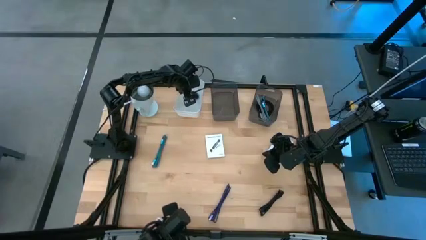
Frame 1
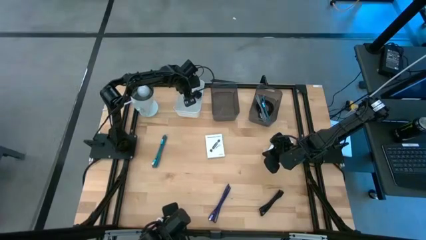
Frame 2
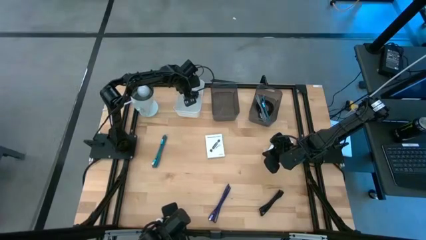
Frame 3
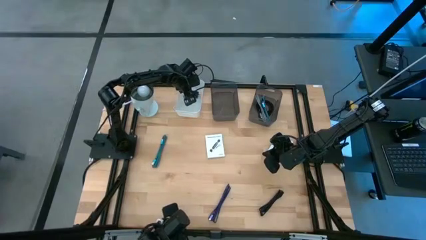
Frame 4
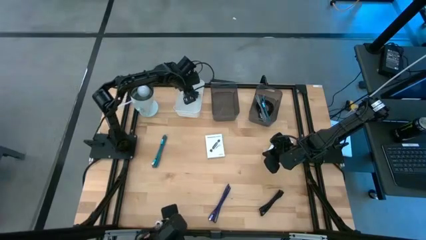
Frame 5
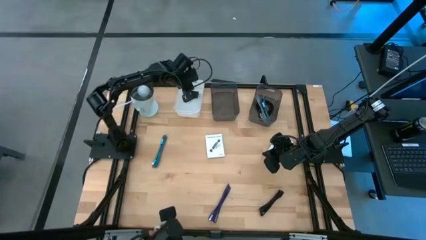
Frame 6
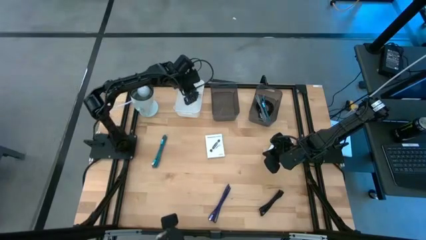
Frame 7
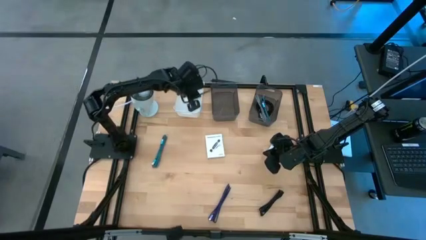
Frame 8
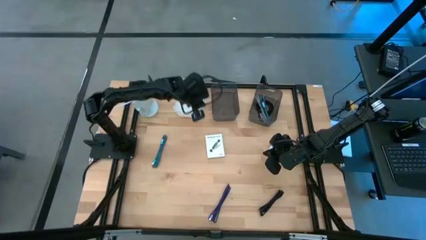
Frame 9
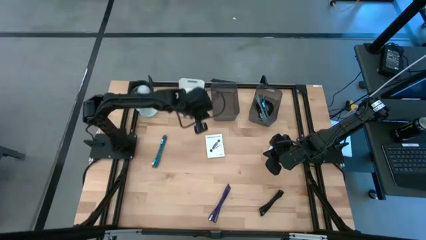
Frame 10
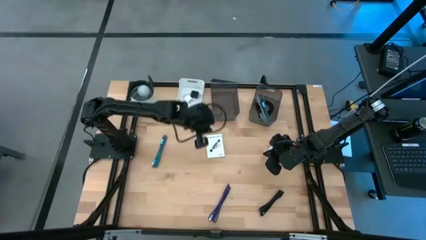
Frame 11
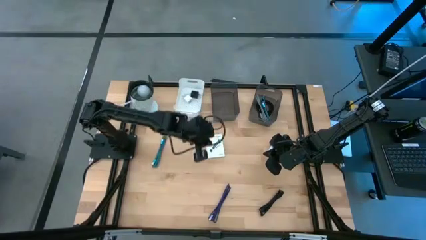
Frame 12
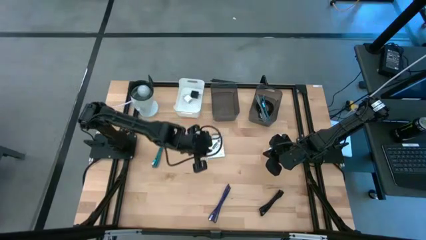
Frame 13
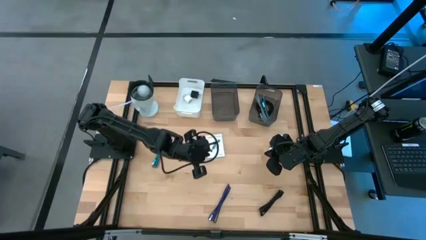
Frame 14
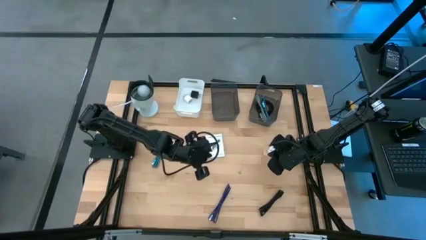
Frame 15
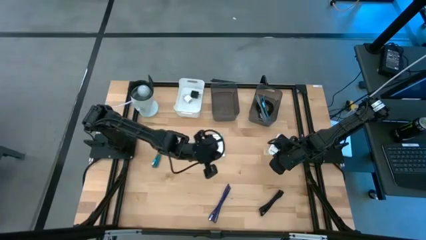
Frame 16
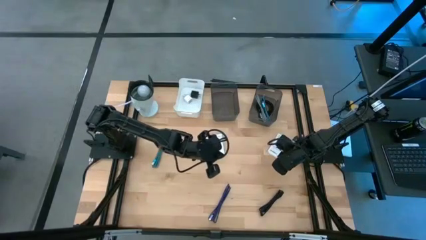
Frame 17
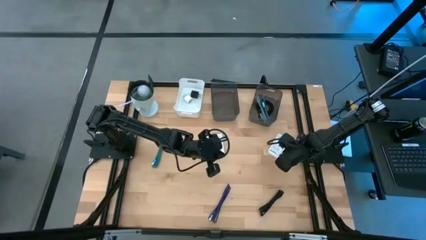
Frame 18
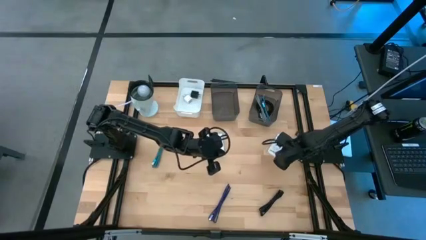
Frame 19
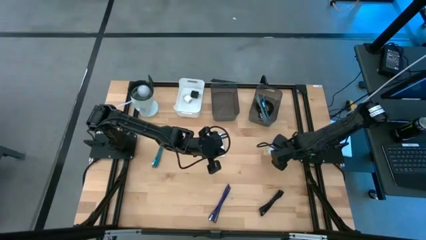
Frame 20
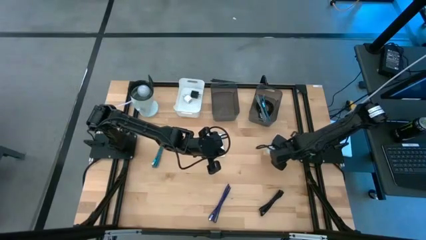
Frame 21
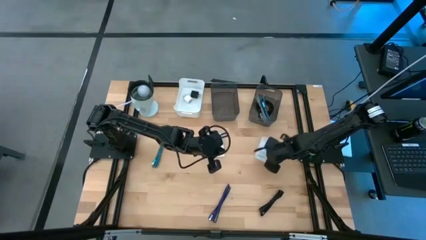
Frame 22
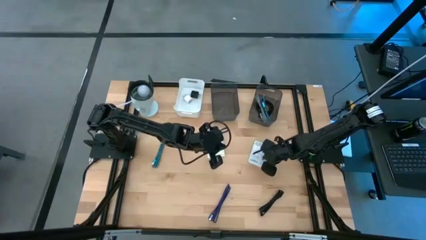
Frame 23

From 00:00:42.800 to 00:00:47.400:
Task: Pick and place items into bin
Adjust the right white card reader box on the table

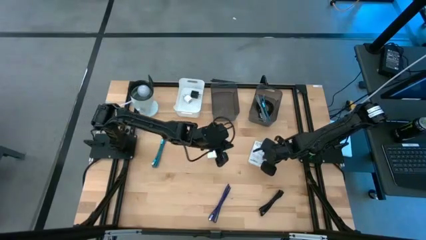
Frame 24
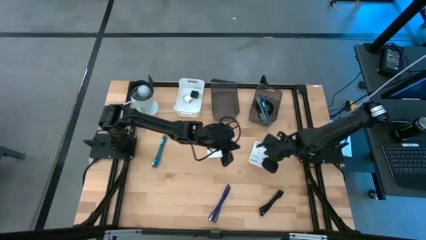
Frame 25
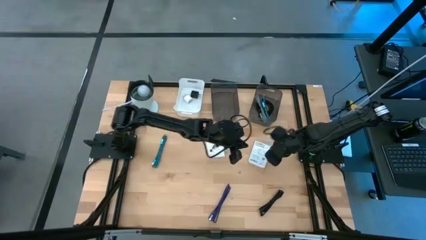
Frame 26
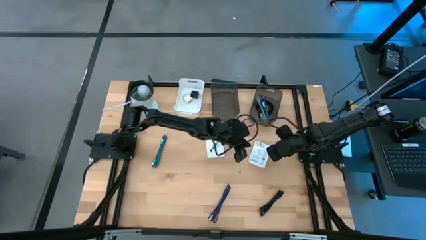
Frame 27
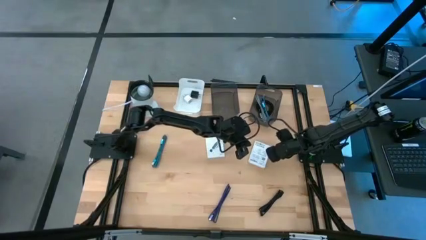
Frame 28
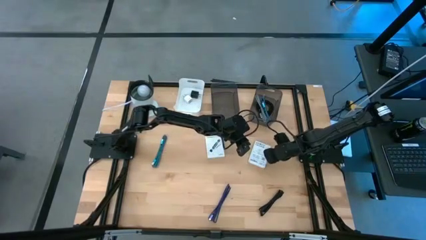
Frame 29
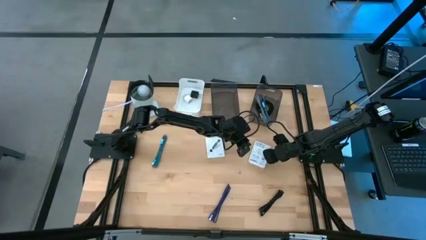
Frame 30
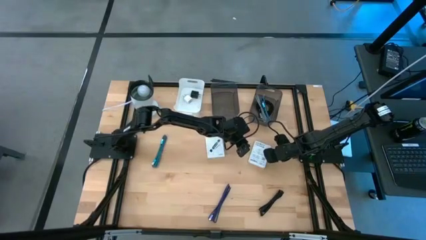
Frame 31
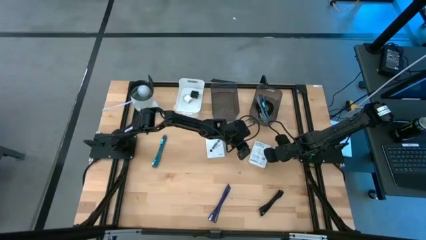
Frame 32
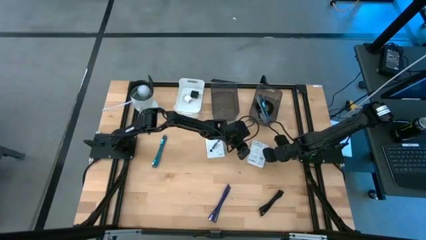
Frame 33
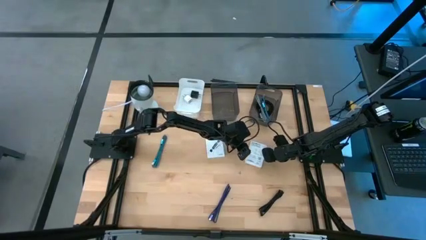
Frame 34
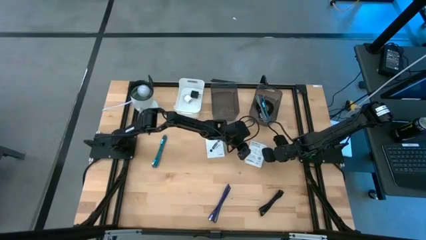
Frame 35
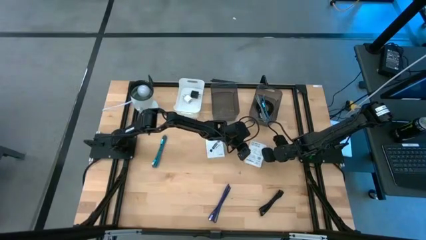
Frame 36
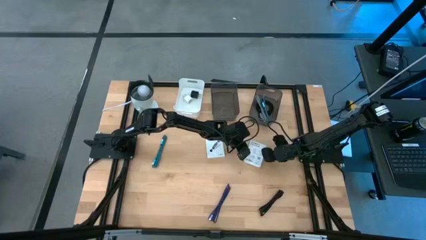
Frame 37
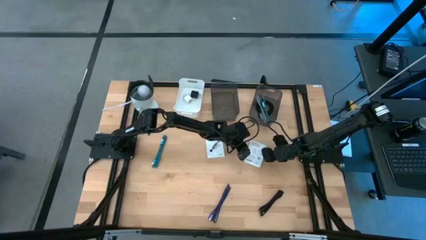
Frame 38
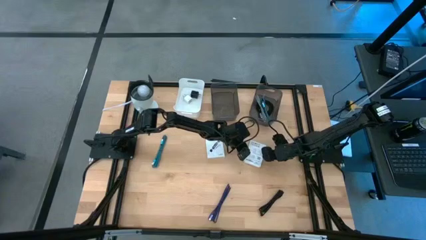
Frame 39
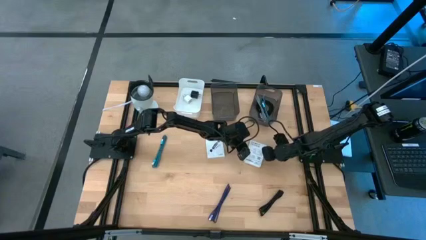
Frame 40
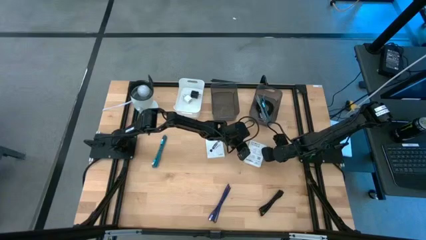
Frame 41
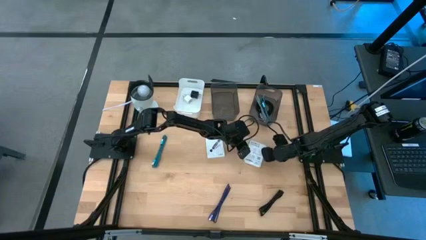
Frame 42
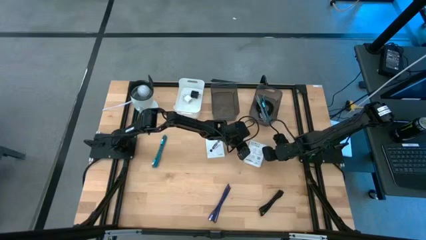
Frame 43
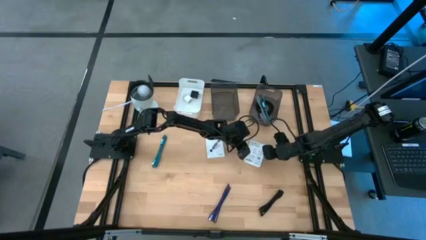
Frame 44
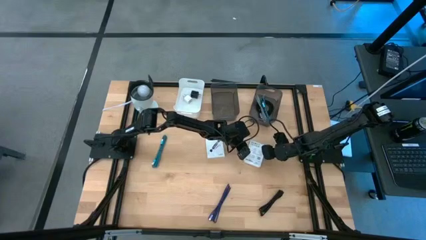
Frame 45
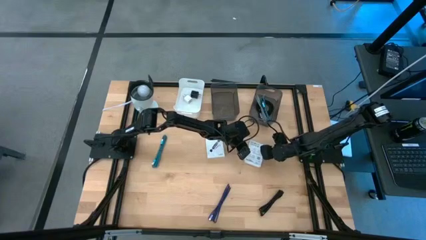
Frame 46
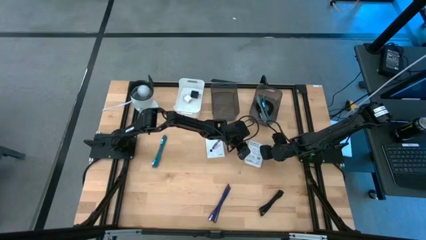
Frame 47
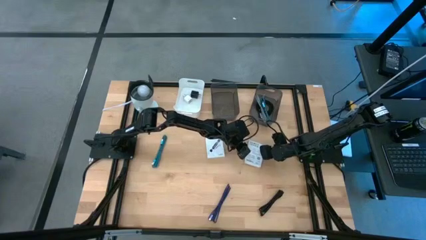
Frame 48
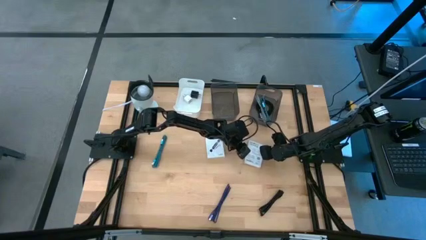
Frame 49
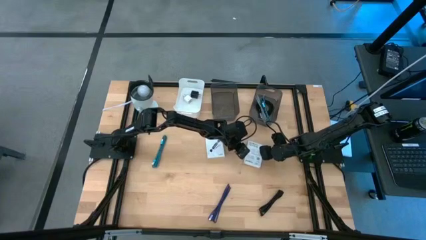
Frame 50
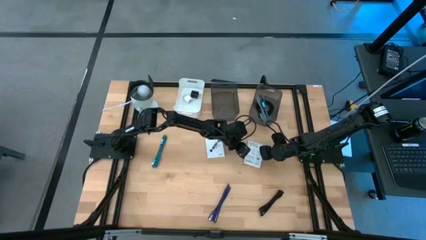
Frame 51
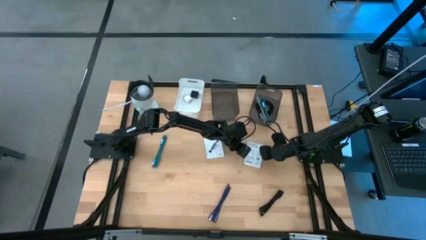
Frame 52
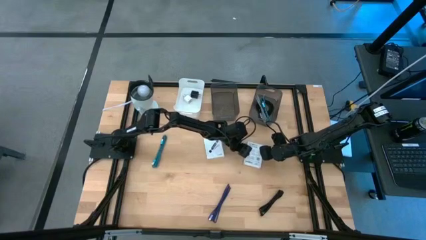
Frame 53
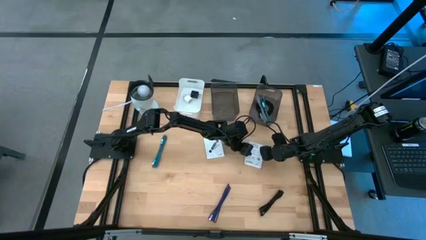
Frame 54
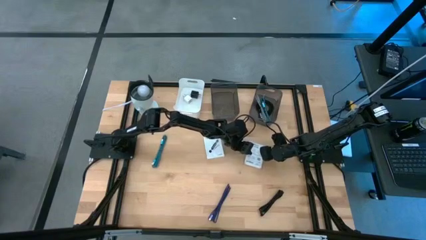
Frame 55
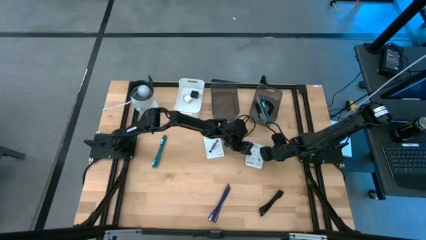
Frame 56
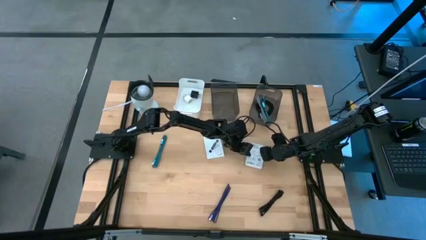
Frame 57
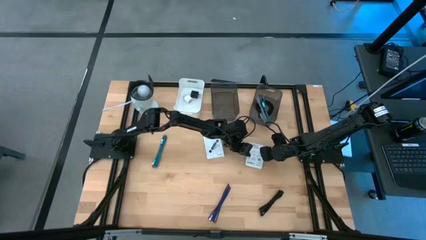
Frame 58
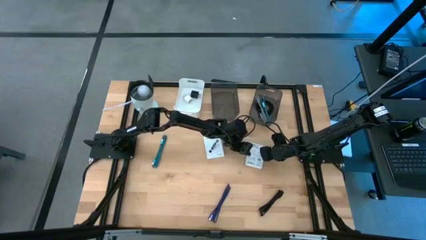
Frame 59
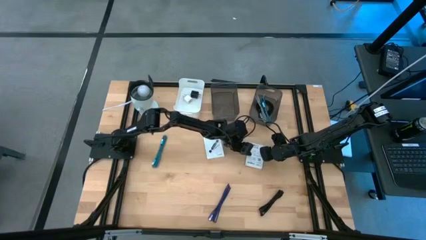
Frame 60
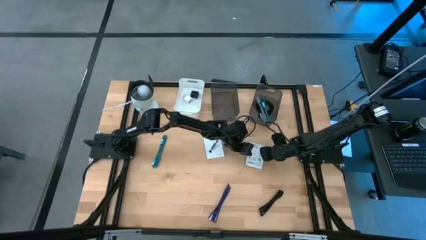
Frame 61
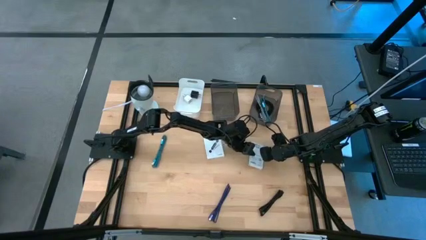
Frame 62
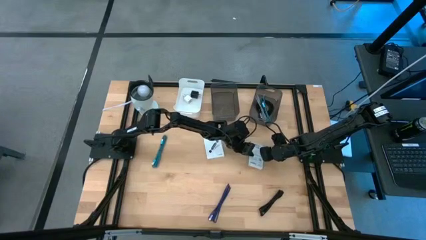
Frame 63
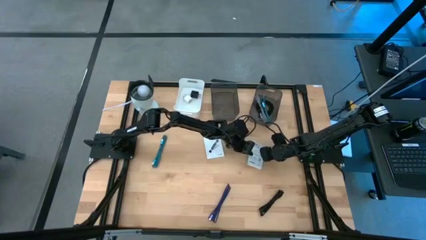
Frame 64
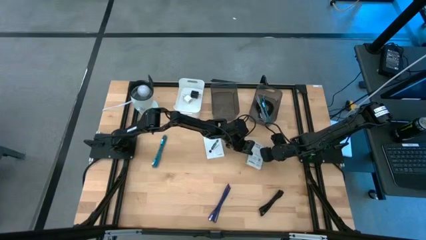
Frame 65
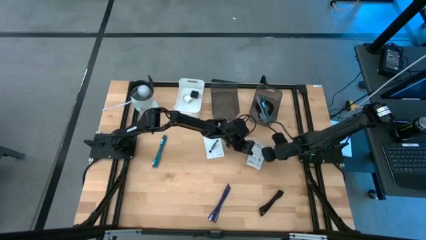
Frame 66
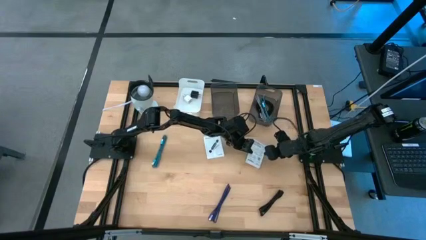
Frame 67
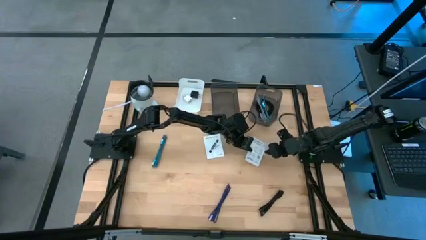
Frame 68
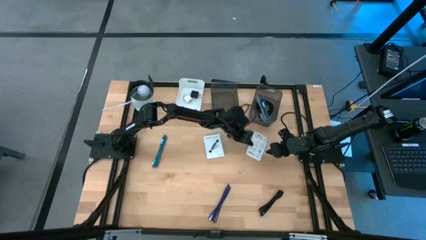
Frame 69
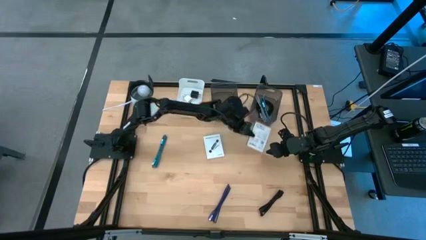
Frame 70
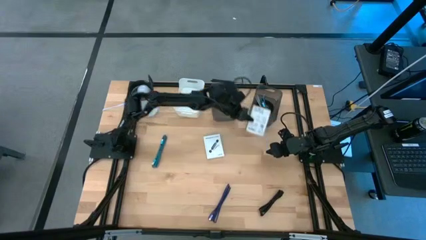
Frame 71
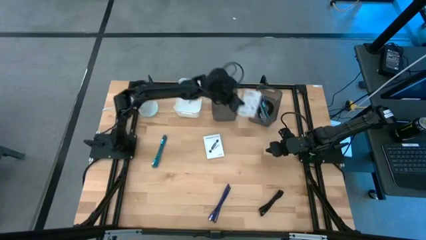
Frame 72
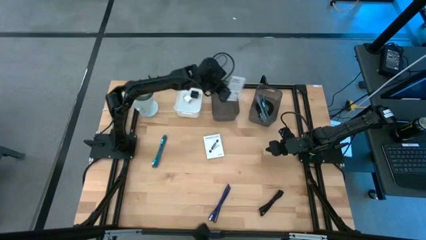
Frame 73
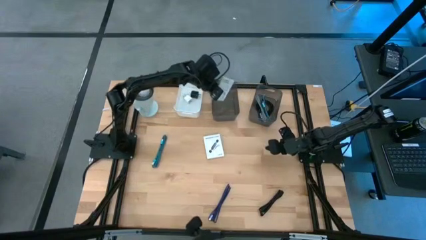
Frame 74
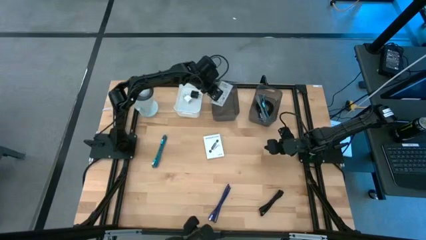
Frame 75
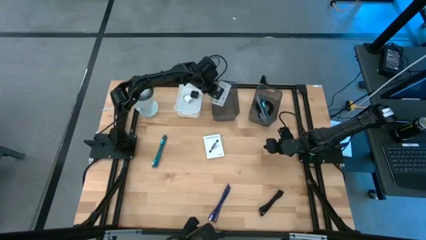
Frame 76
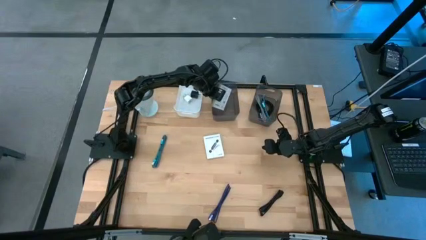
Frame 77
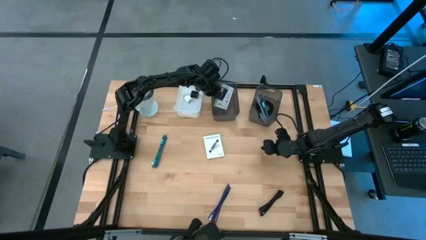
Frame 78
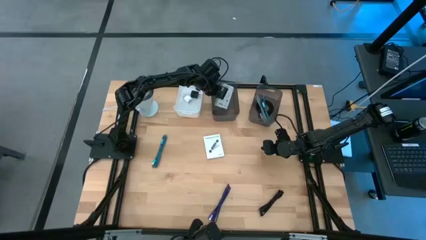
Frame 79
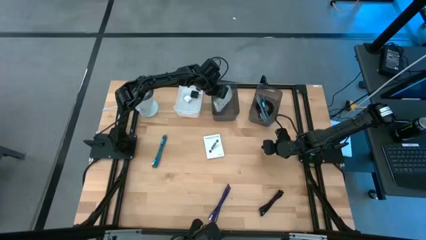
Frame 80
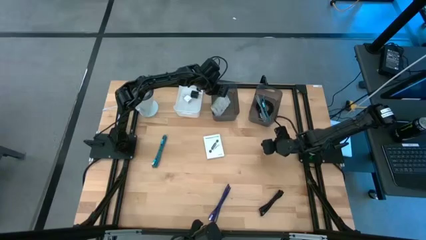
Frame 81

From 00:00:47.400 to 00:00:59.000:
Put the right white card reader box into the left black bin
